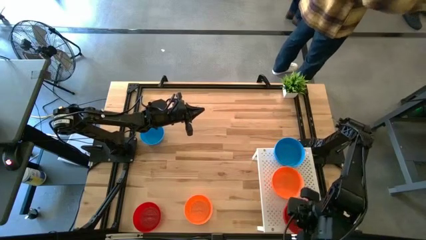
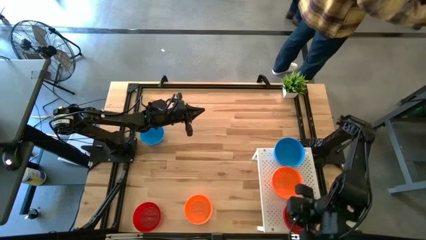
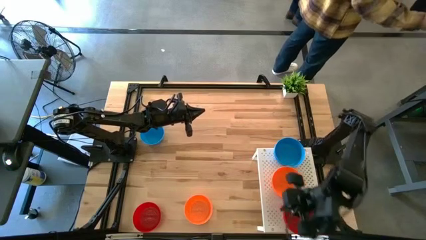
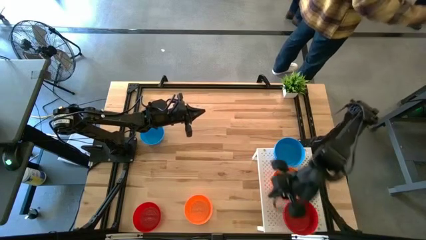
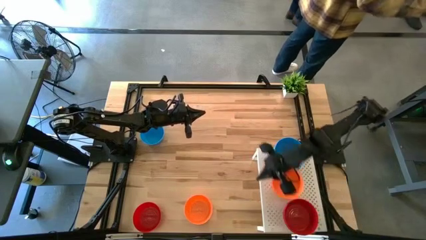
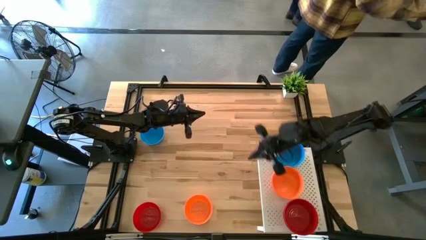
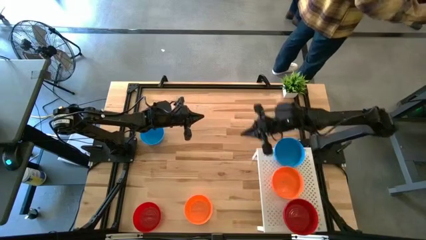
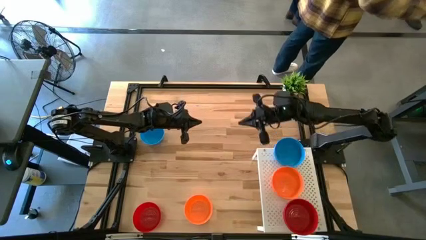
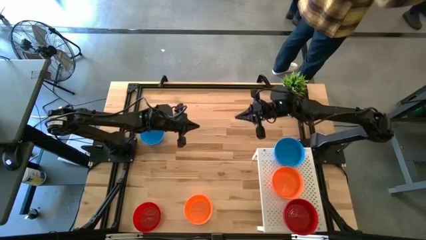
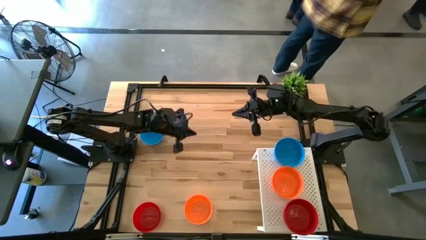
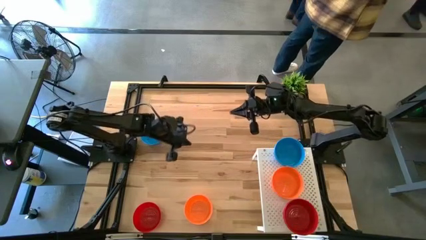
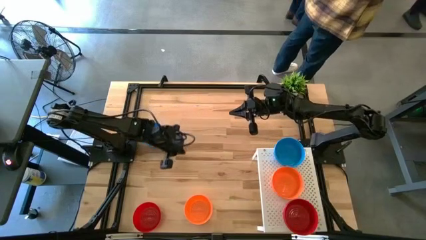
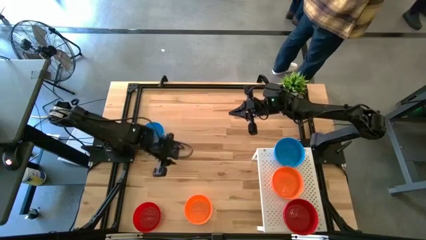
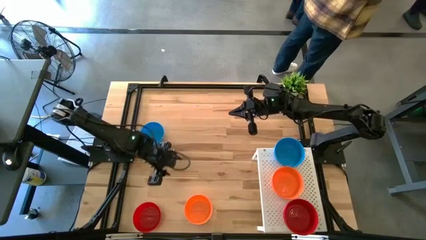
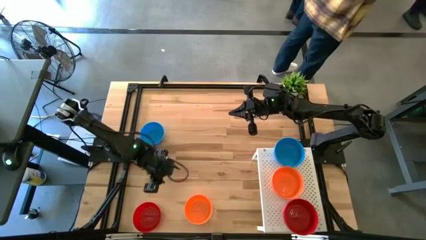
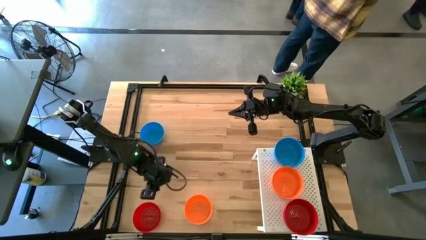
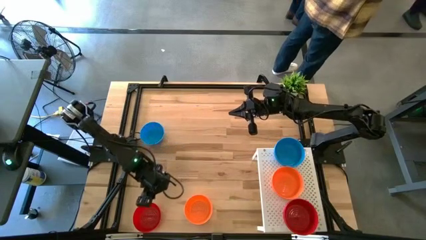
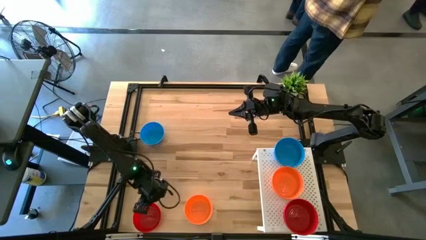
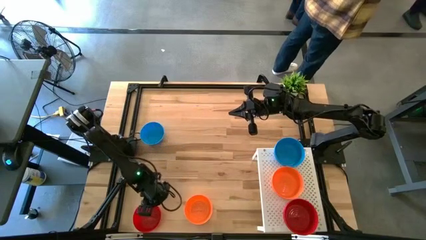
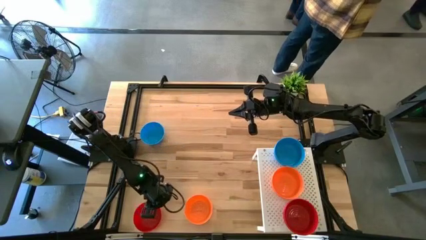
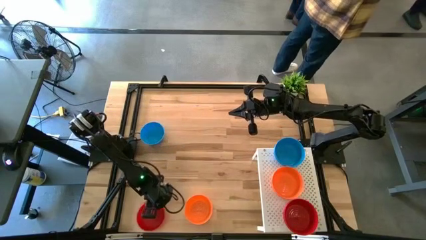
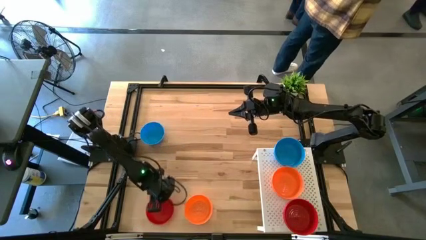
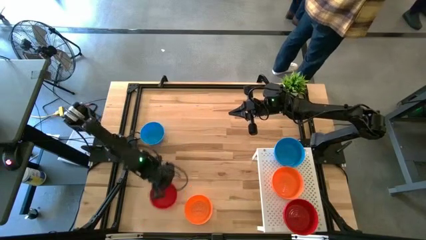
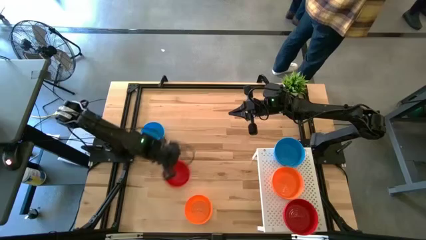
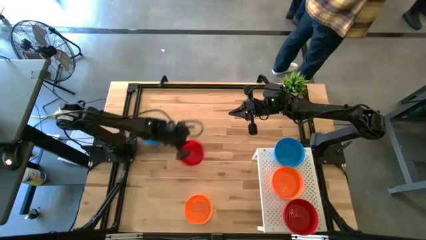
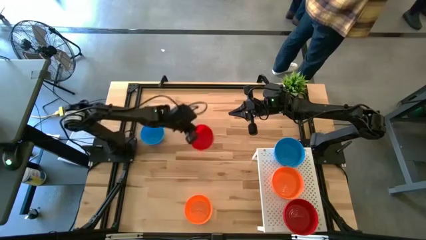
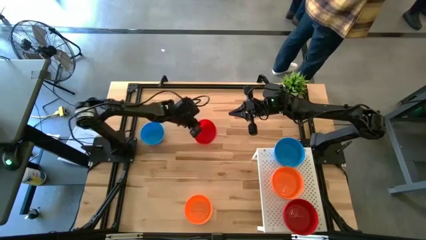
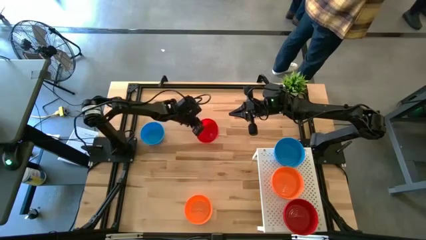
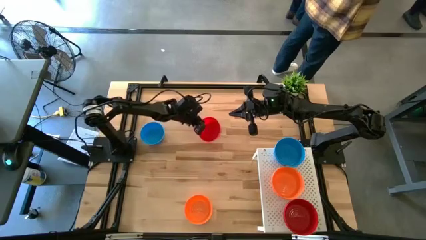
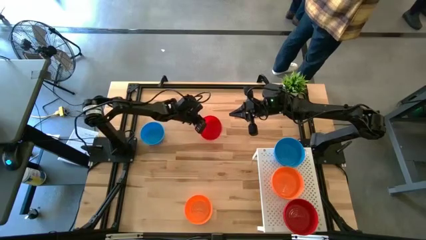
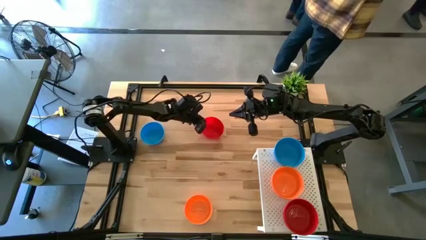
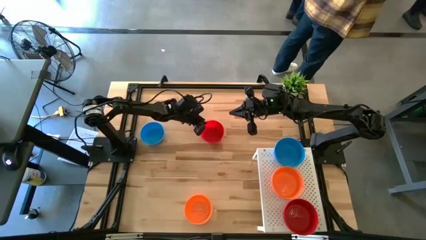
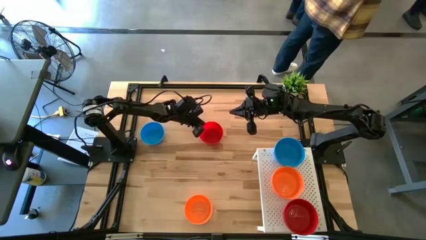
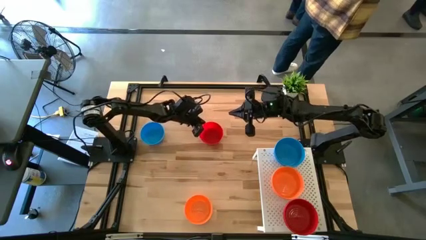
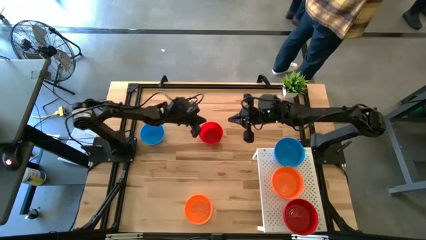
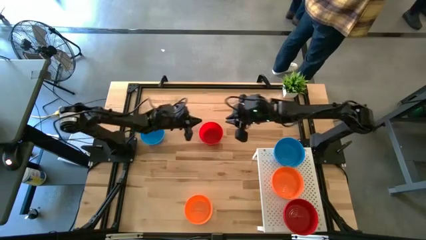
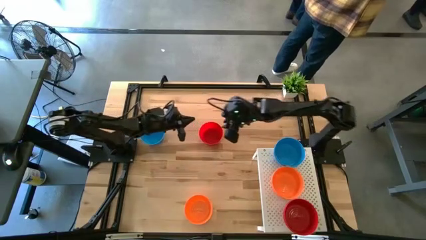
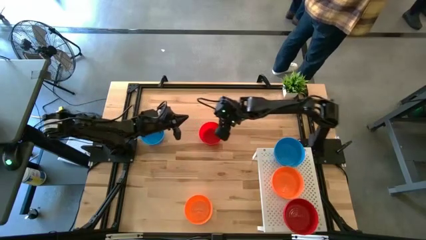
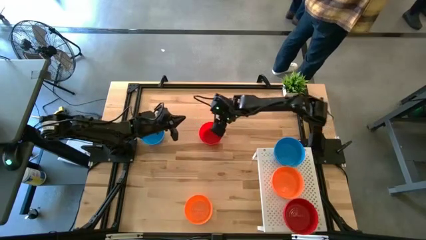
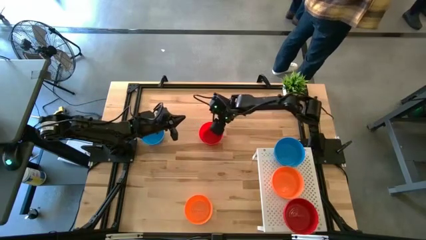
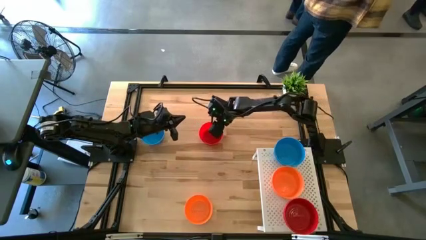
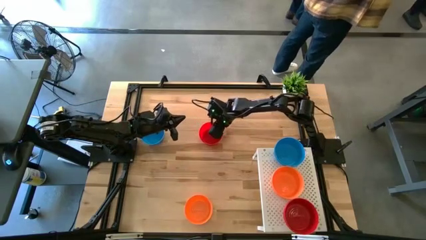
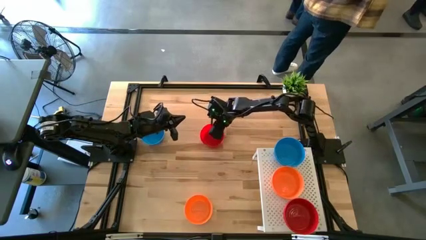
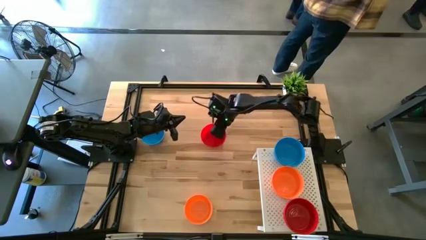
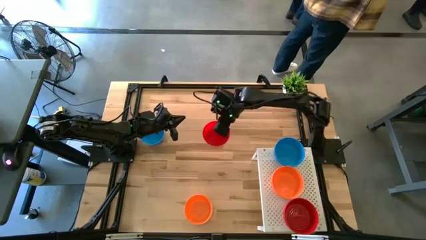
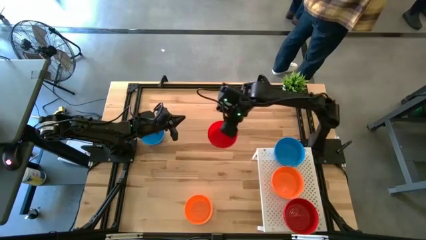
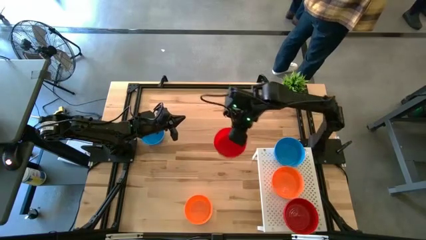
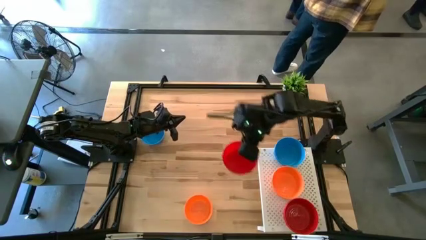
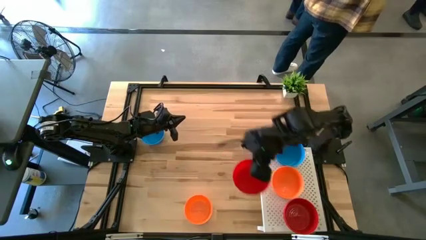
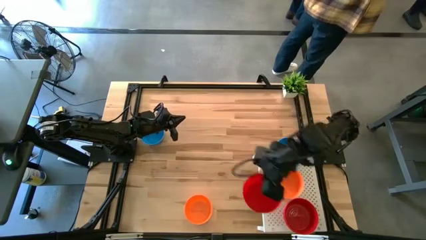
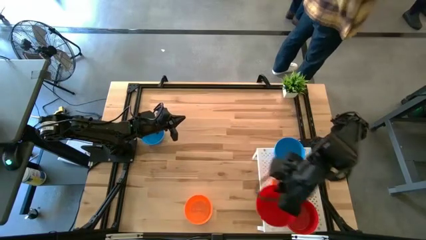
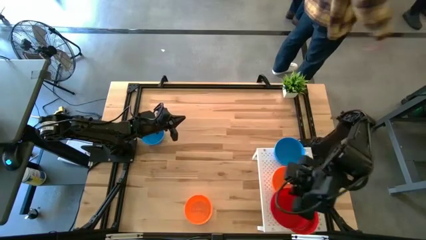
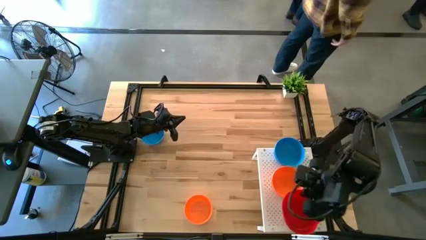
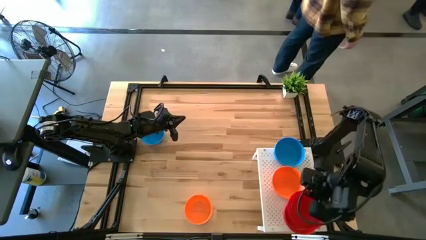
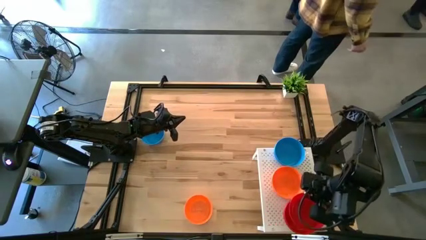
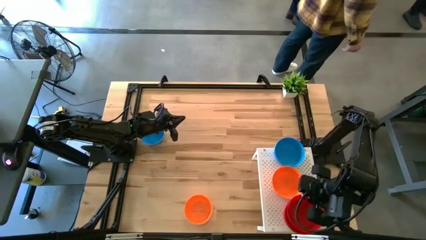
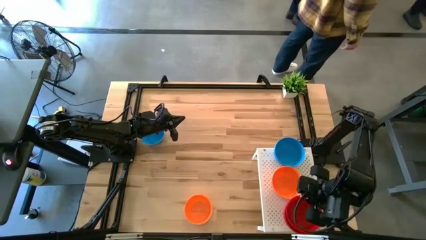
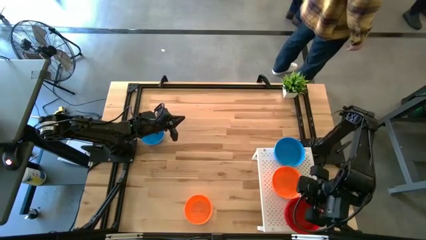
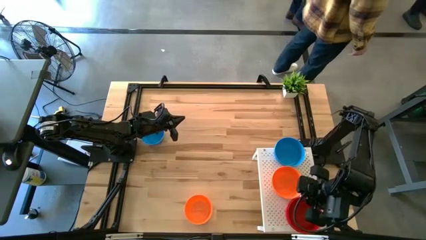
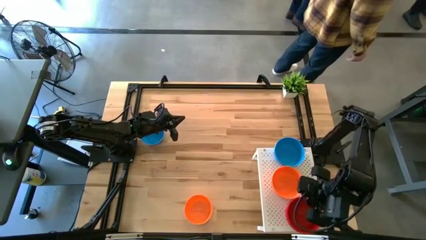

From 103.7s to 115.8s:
Task: Pick & Place Mini bowls
Stack the red bowl on top of the other red bowl on the shelf

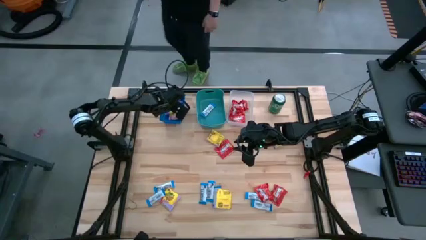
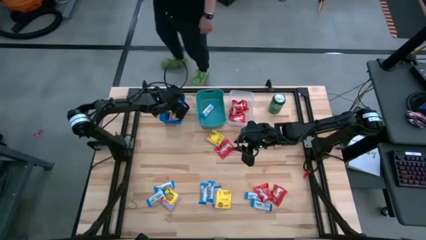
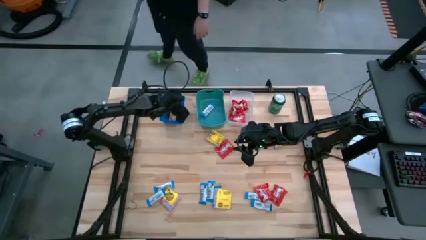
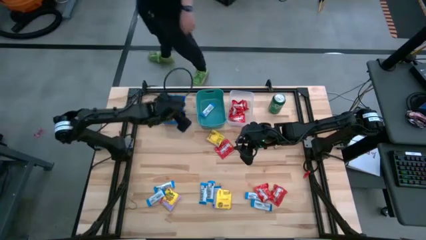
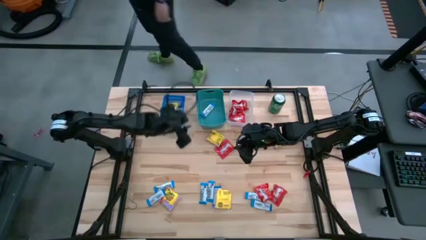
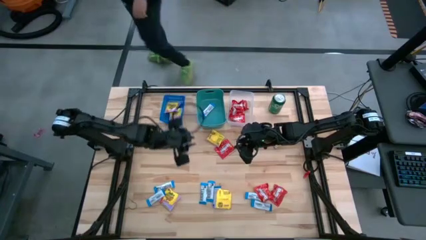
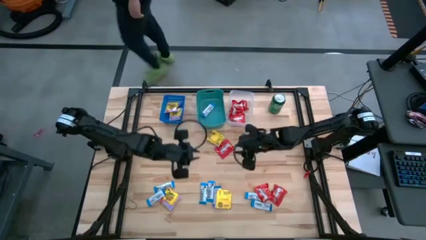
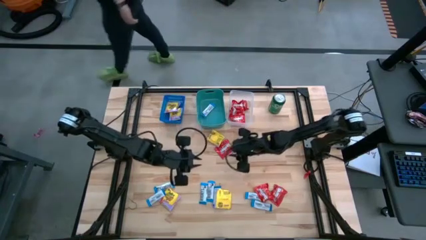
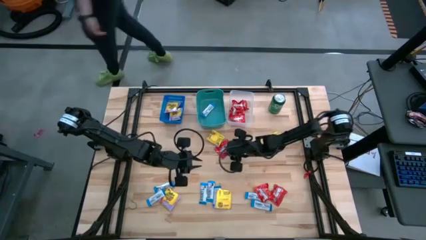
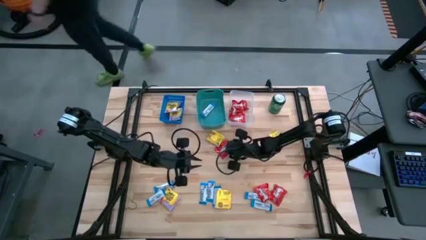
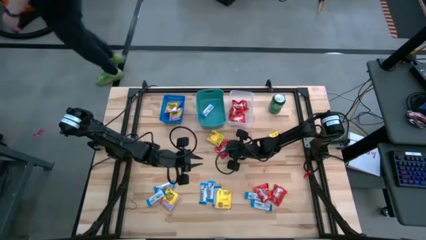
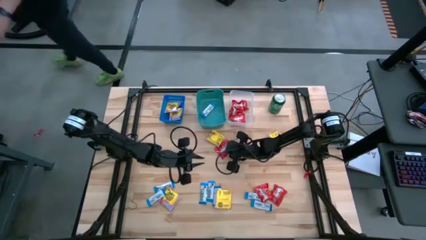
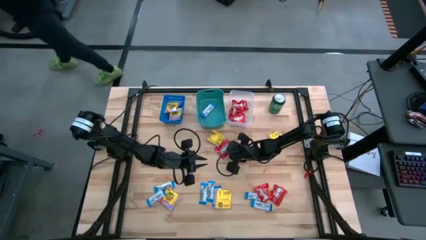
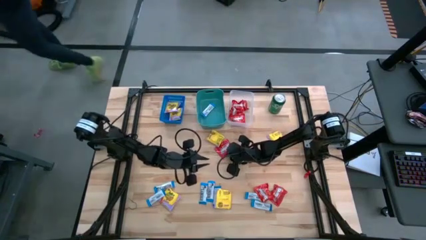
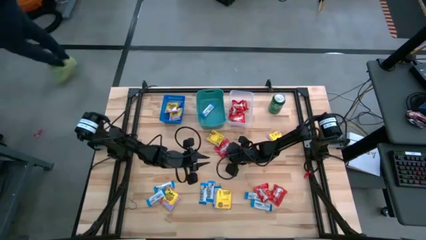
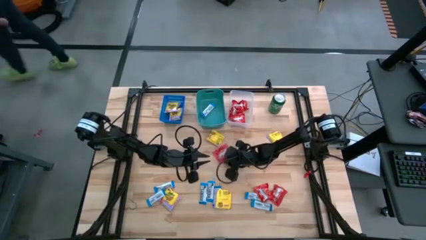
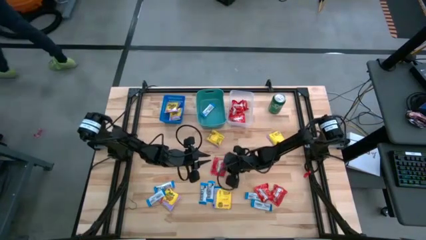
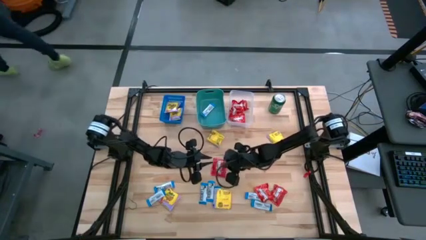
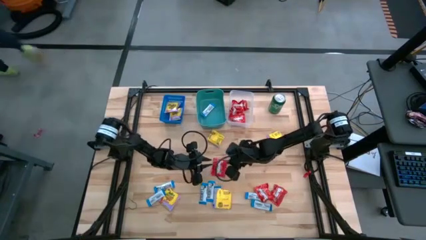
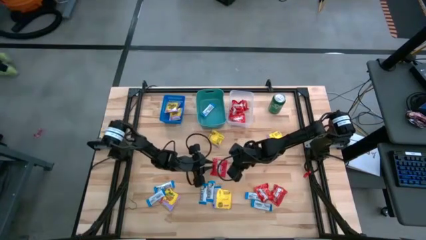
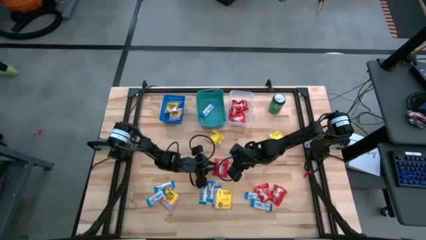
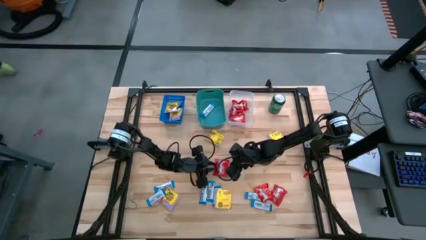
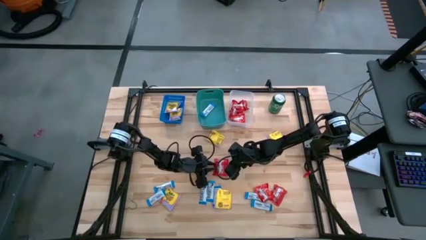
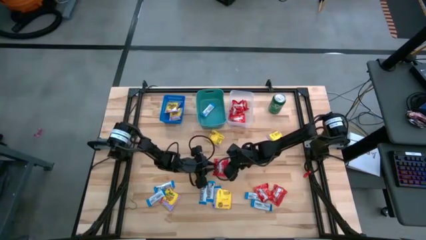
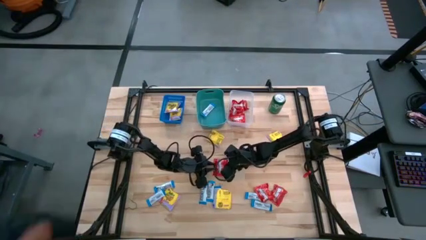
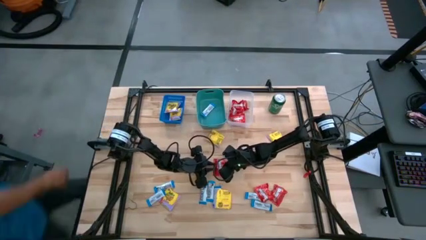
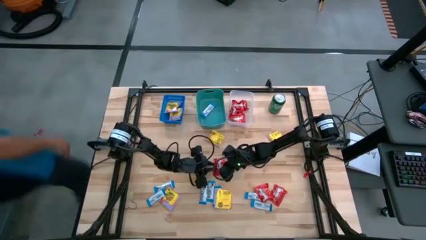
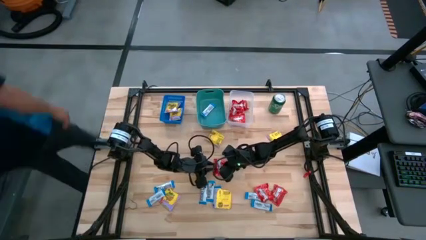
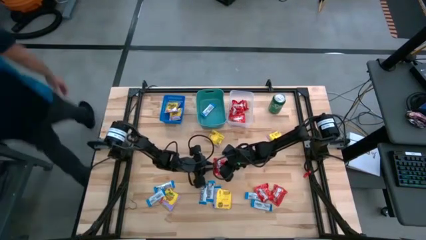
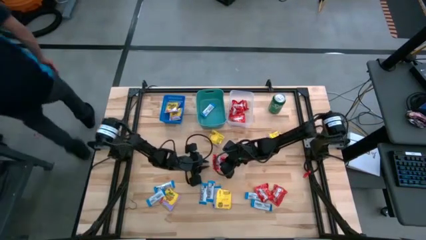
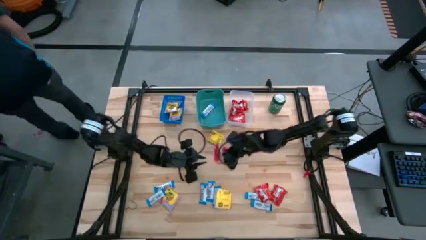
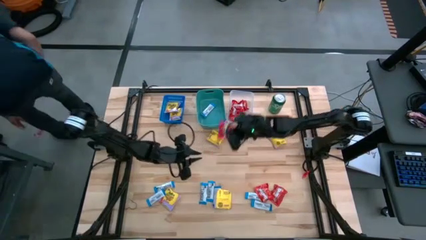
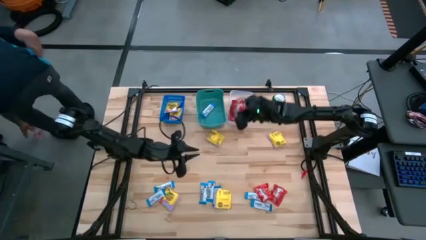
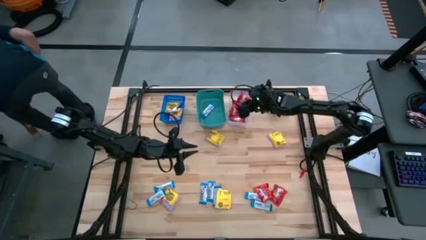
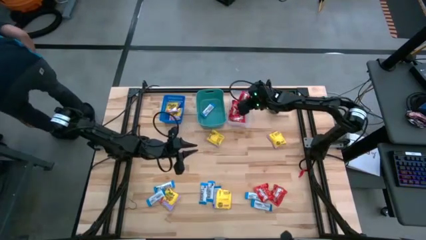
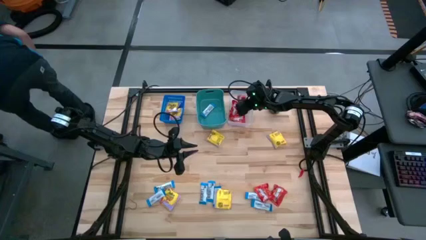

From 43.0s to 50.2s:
Task: Sort candy
Put the red candy into the transparent bin
